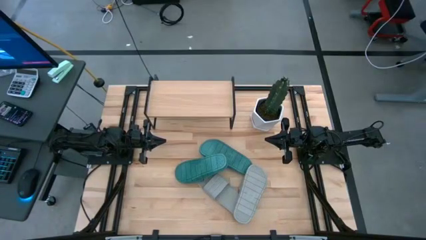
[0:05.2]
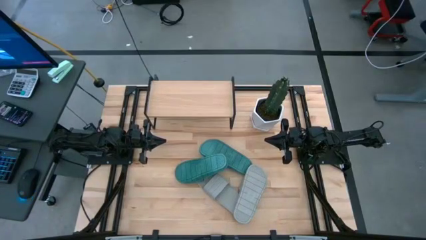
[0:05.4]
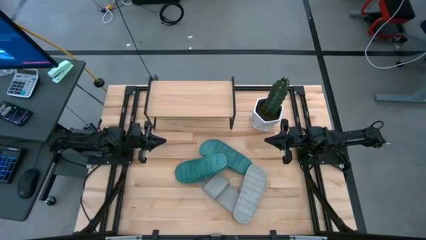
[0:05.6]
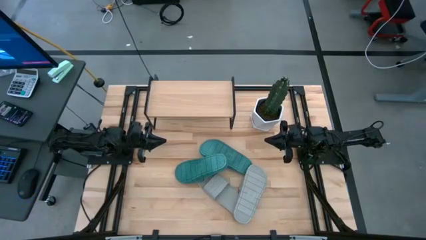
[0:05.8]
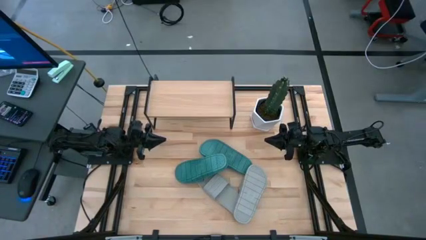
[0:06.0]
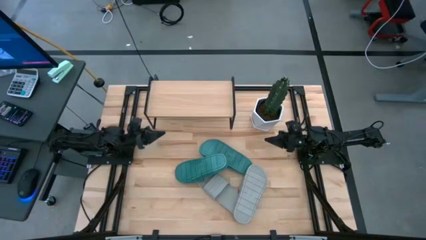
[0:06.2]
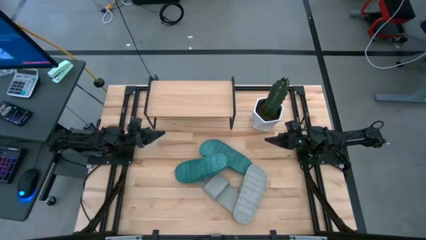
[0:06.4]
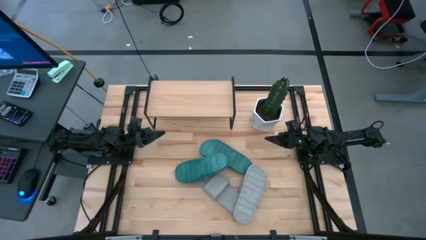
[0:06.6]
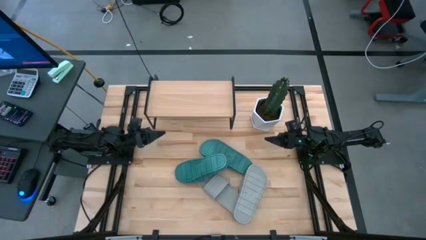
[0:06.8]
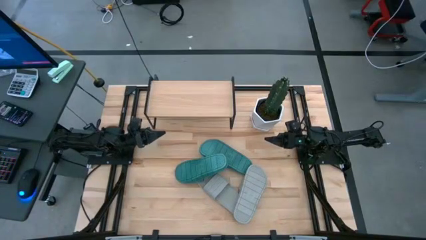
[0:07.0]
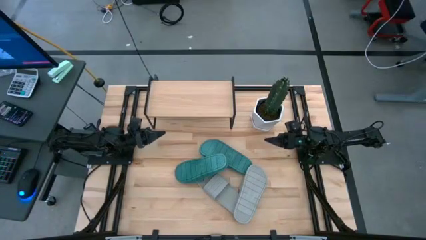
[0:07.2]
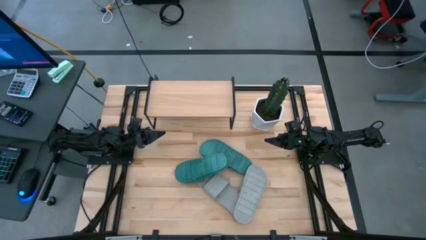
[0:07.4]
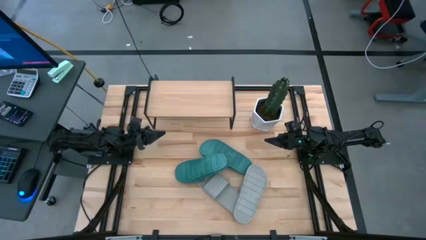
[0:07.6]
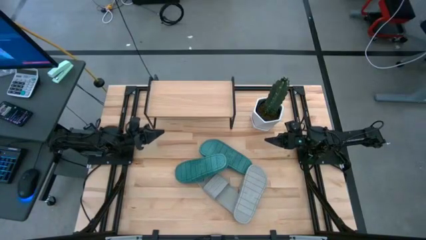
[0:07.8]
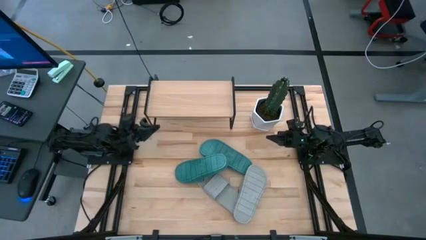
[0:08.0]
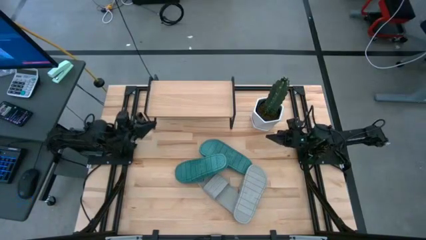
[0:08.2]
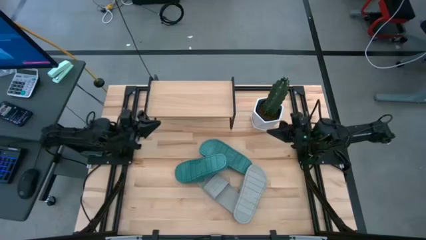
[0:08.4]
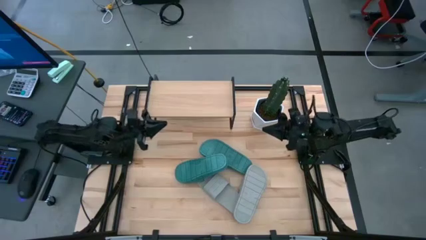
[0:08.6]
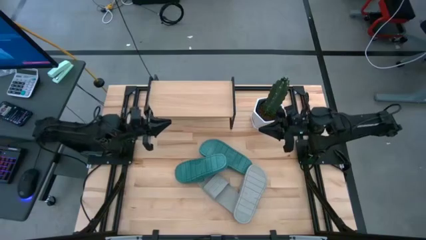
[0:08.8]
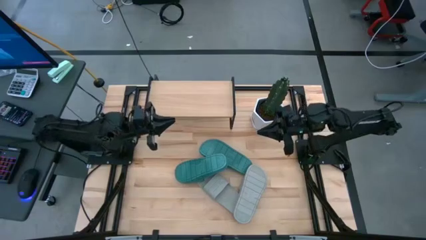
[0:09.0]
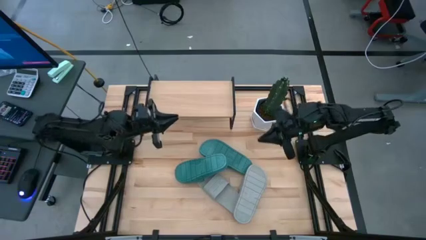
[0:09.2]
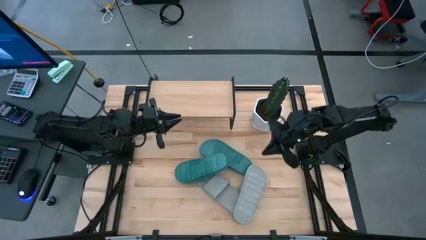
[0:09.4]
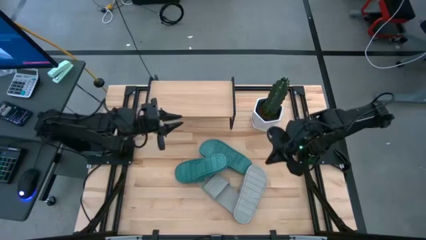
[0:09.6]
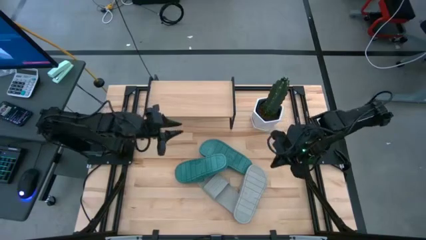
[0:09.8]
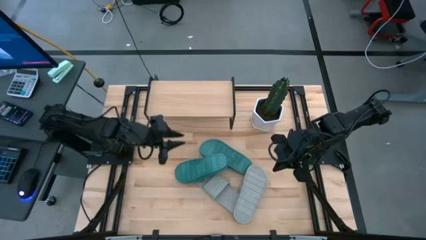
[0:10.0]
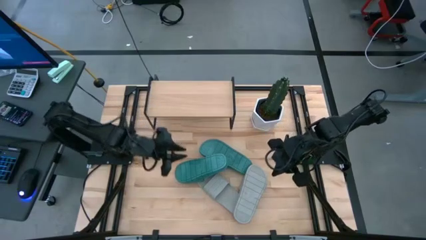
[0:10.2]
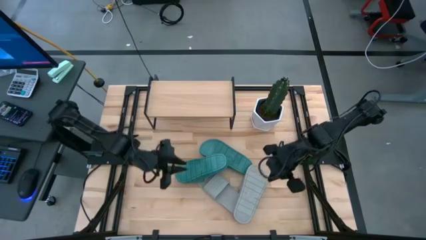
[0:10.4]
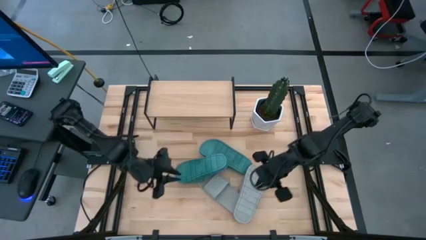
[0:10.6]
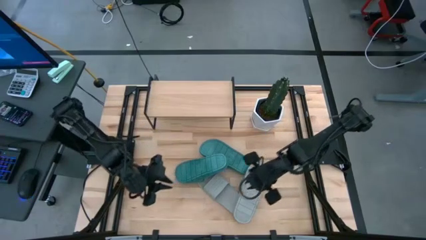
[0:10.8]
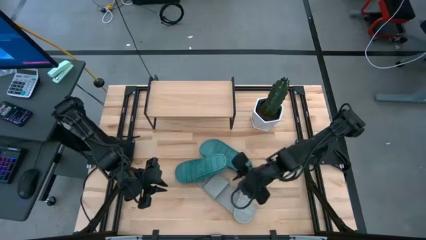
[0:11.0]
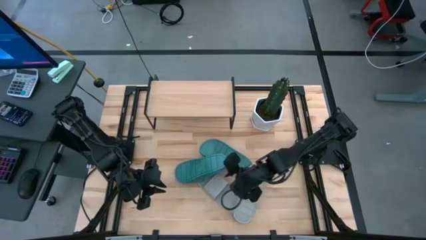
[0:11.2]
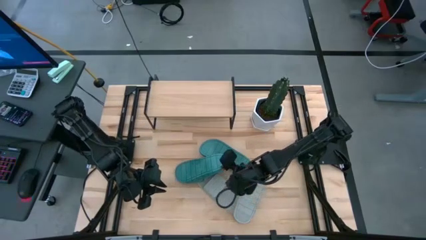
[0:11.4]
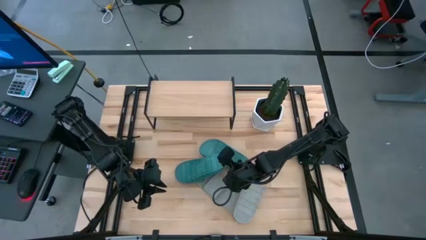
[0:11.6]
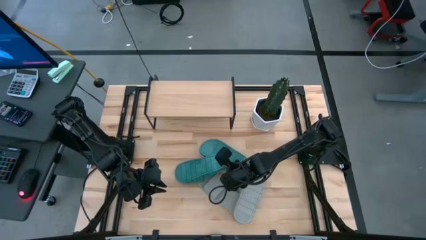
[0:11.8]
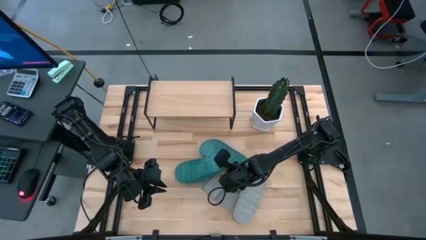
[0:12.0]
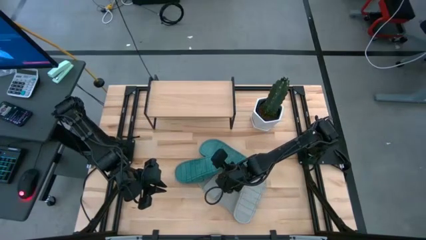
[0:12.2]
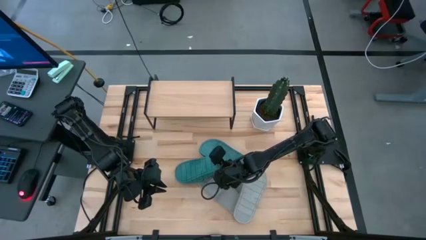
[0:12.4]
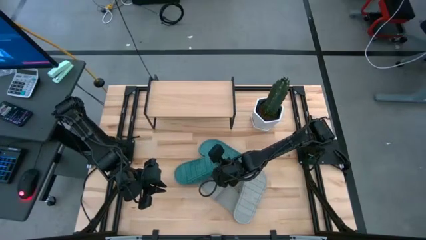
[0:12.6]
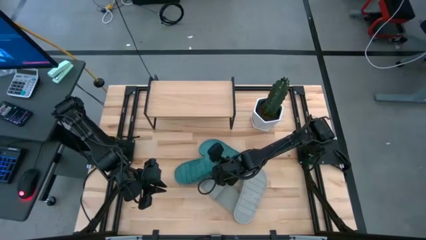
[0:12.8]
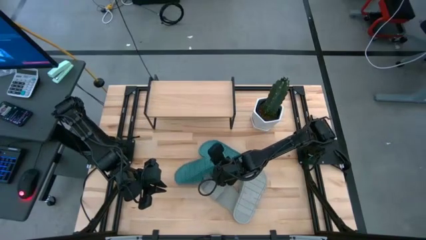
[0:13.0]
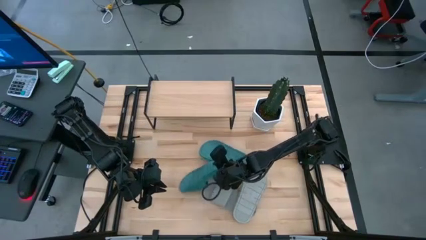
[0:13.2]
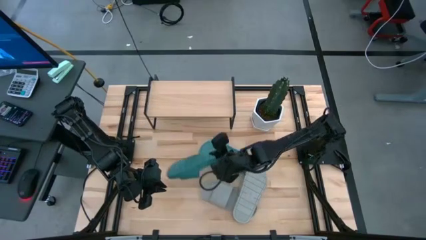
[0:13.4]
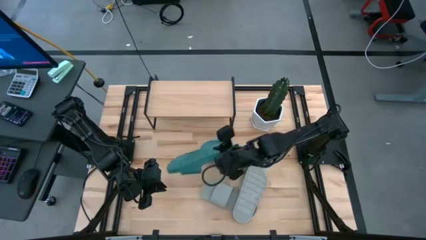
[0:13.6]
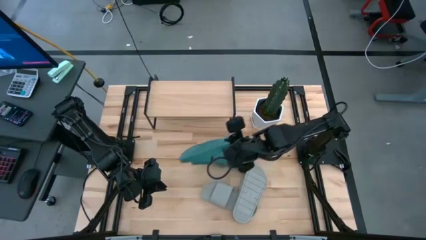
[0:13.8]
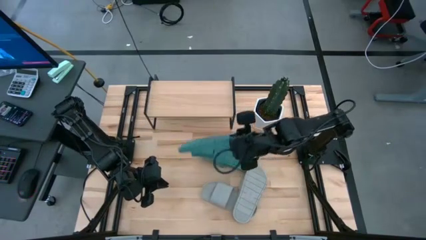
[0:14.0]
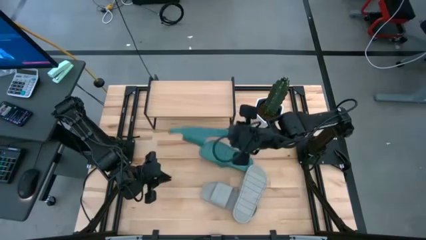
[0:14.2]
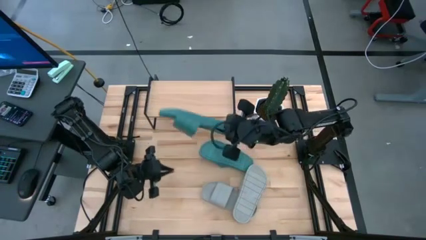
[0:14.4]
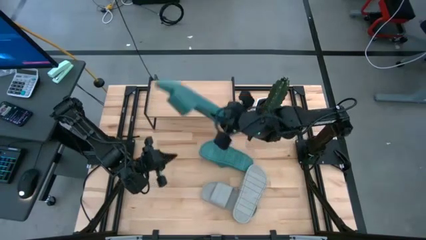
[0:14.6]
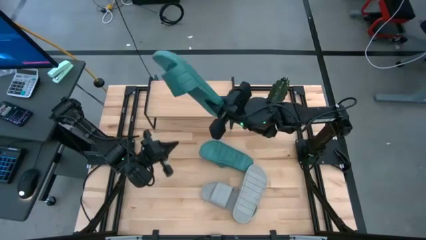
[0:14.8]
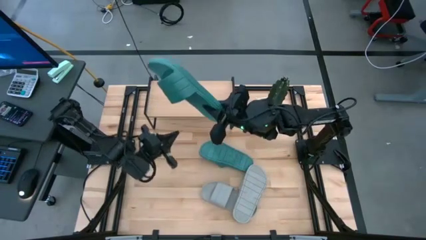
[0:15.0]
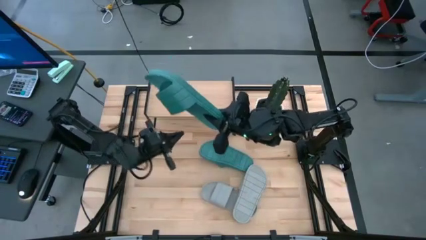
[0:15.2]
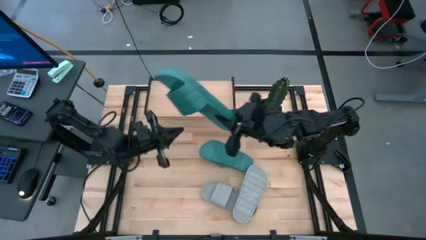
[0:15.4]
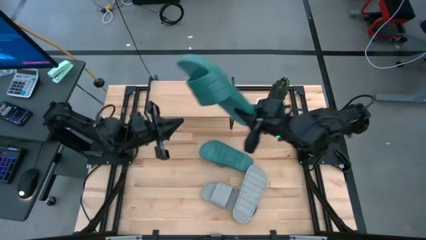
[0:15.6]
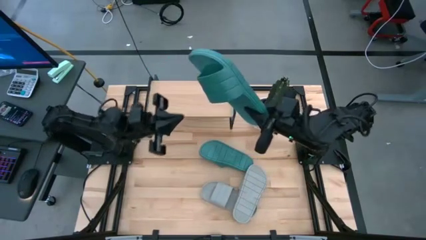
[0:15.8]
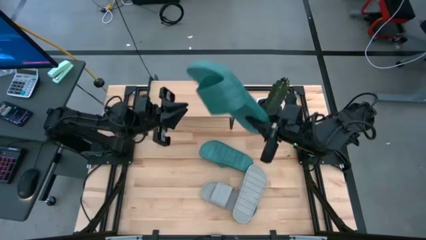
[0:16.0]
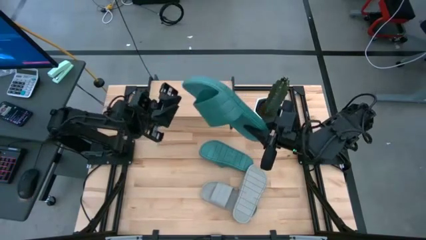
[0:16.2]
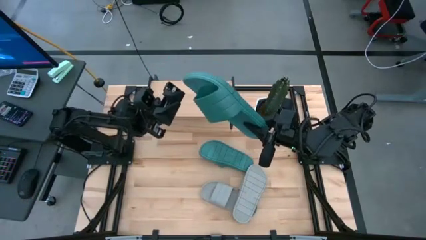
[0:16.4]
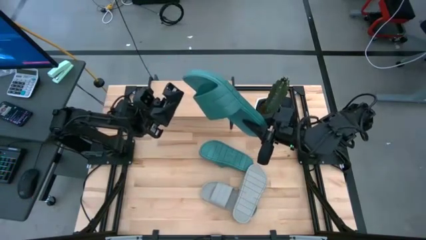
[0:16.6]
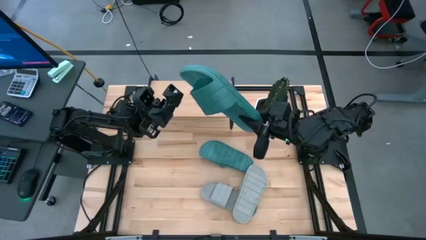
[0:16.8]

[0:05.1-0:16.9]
Task: Pick and place slides into the shelf
Put the left green slide on the shelf

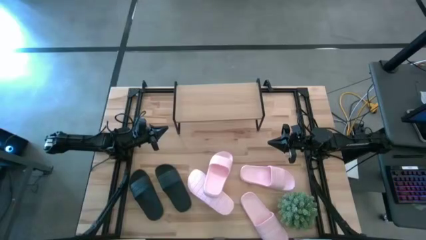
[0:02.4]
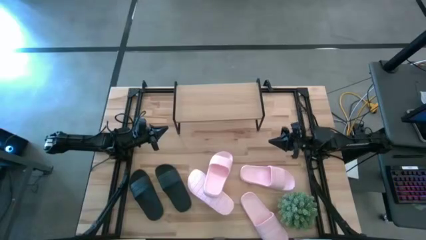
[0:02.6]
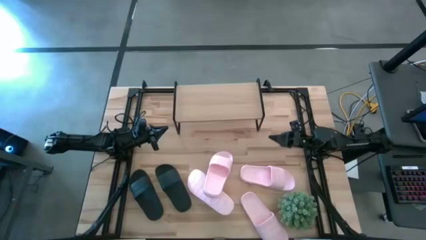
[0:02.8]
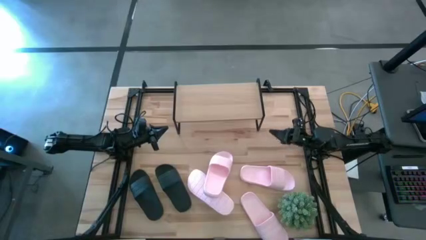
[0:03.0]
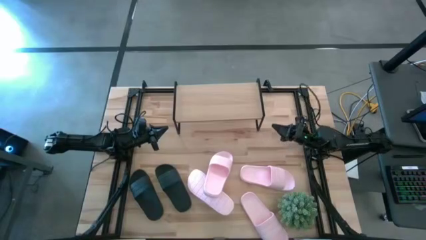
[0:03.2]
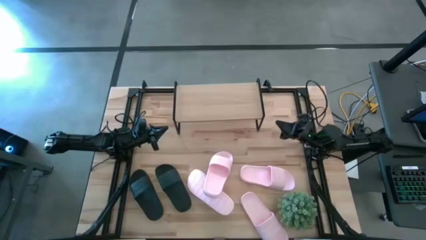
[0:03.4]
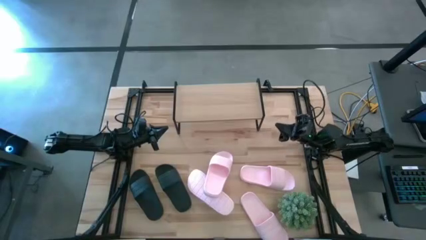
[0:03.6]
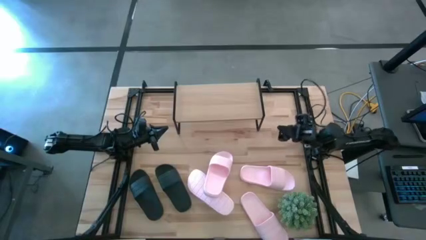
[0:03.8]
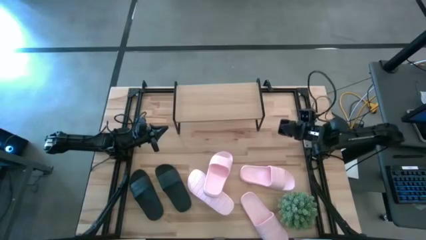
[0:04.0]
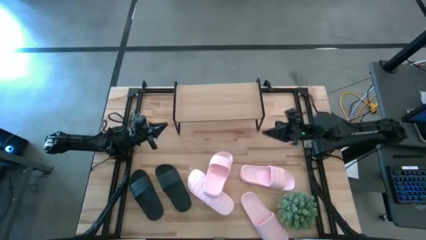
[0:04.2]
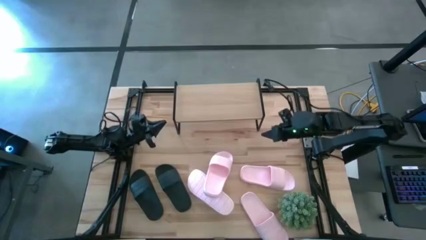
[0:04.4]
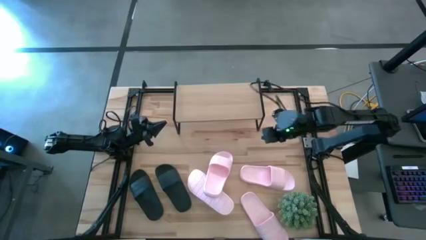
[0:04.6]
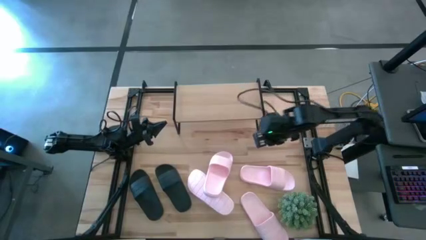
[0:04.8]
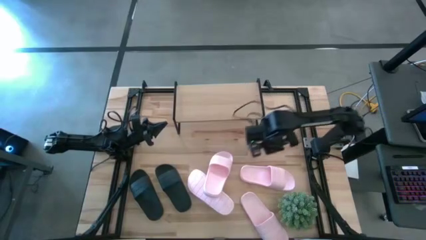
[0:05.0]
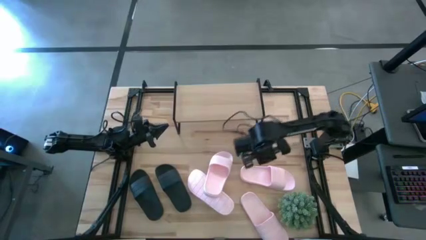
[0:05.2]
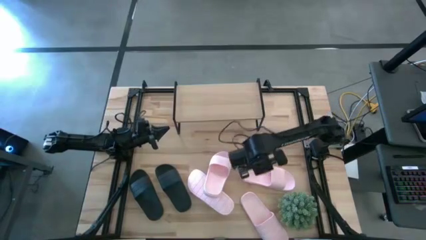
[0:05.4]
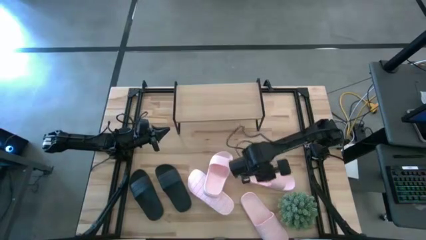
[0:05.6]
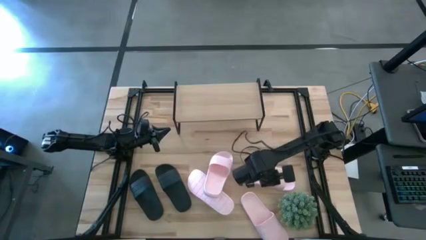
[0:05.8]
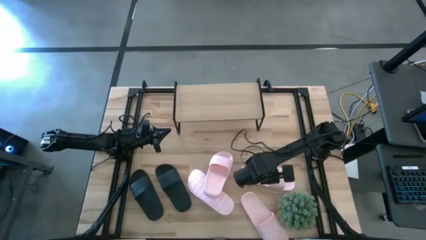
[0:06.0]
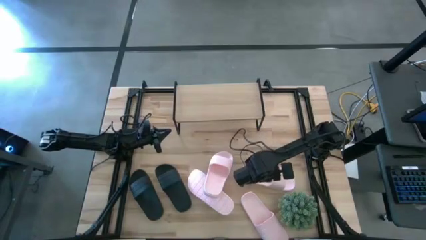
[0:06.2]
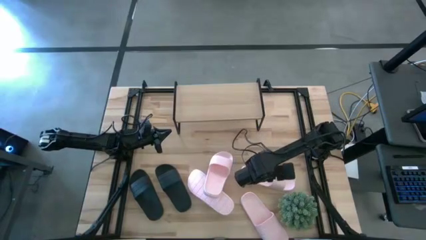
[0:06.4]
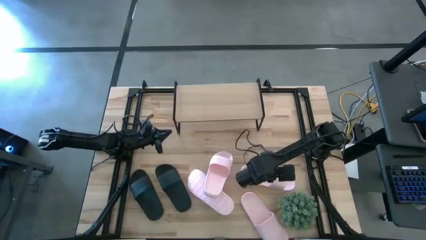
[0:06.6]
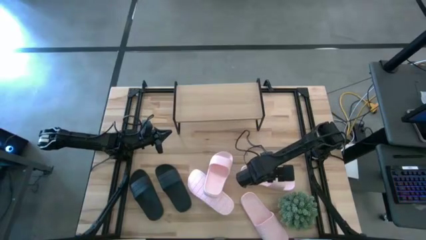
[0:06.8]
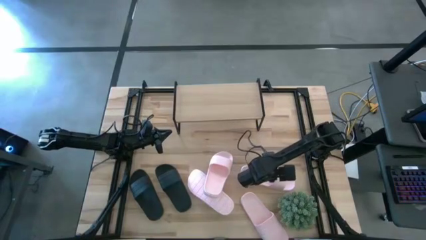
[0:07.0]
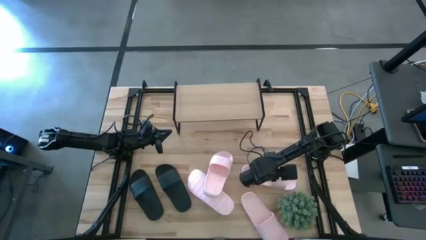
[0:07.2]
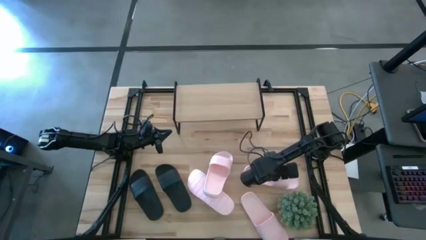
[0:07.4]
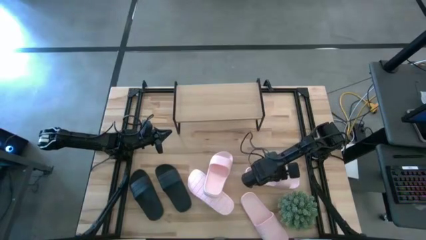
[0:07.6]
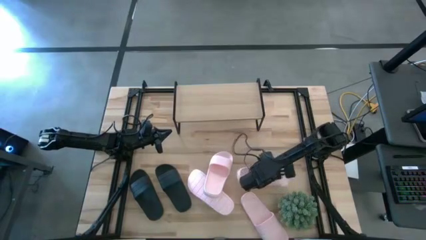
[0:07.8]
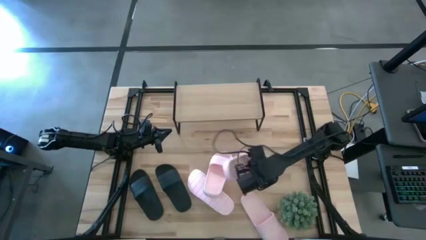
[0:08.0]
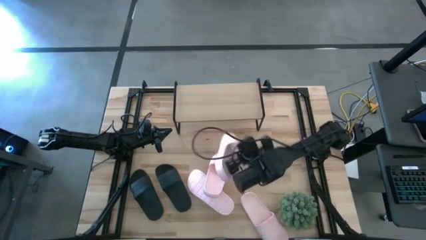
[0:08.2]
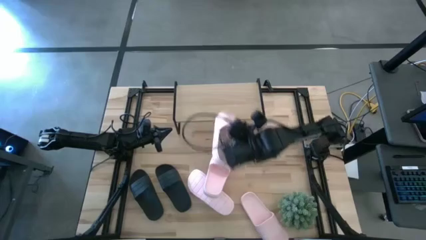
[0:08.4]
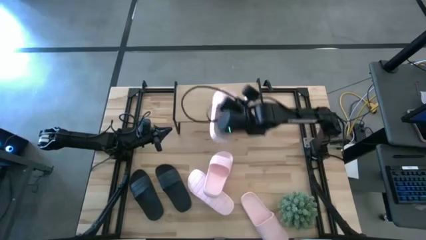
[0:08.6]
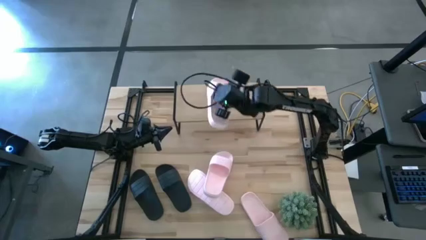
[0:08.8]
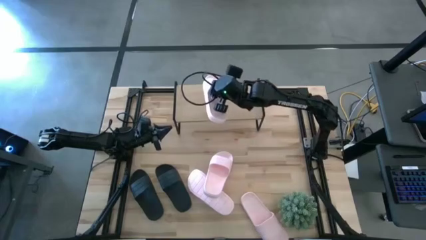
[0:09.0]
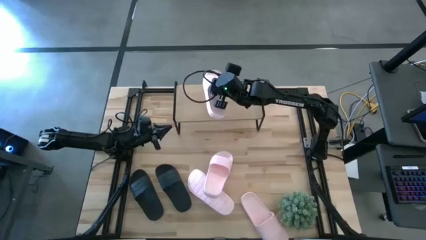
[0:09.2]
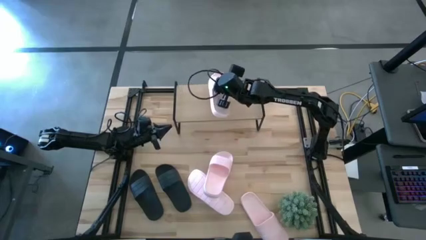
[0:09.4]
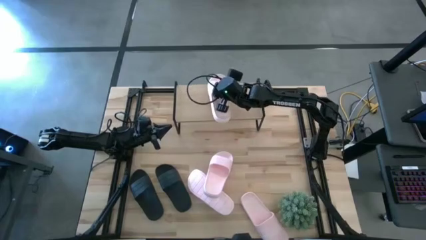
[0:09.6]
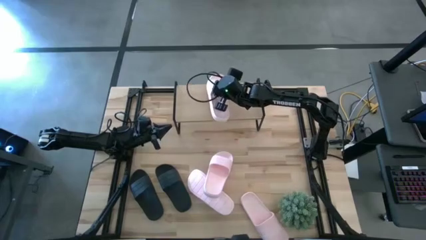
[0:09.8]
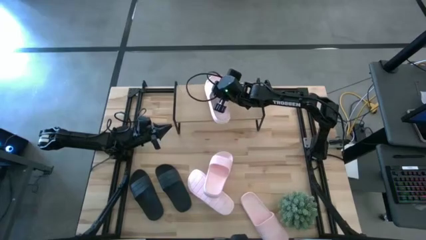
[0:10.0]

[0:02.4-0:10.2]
Task: Pick and place slides into the shelf
Put the pink slide on the shelf
